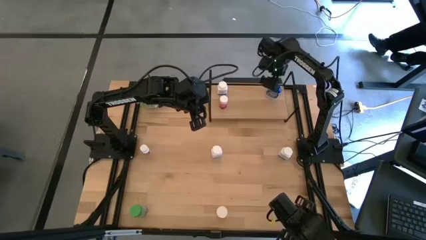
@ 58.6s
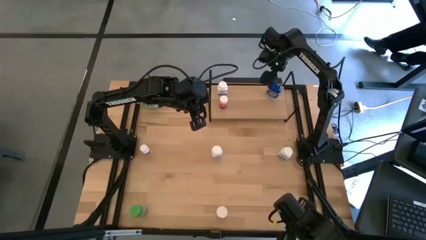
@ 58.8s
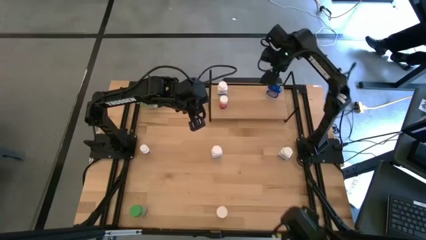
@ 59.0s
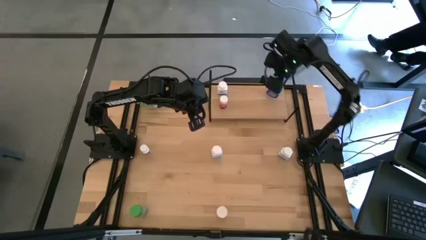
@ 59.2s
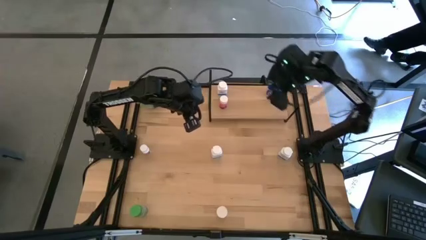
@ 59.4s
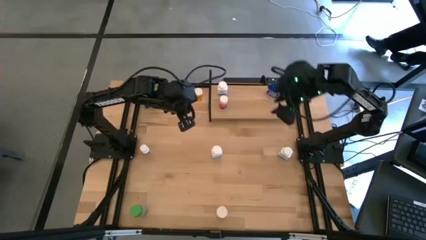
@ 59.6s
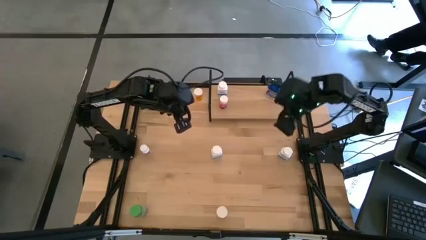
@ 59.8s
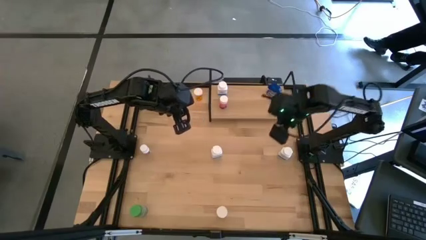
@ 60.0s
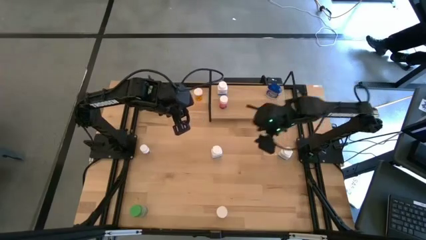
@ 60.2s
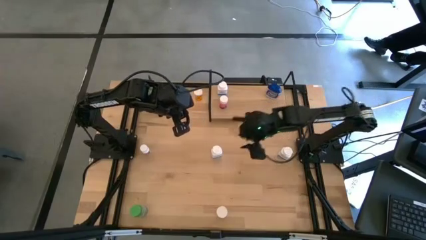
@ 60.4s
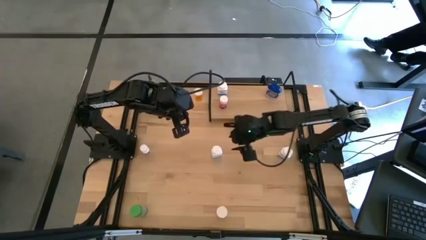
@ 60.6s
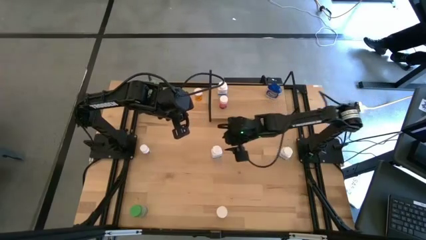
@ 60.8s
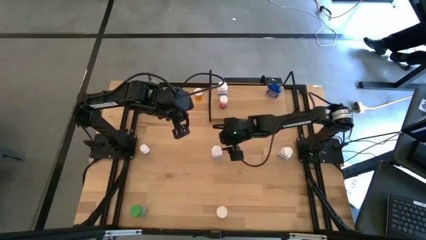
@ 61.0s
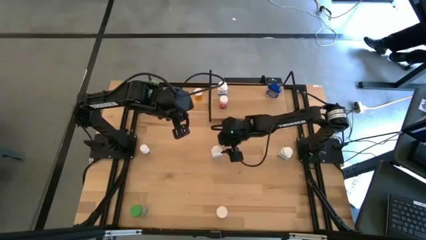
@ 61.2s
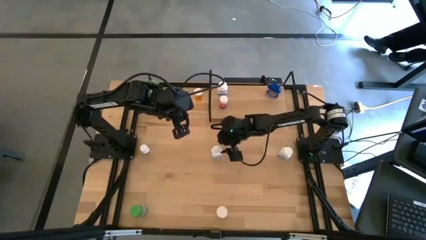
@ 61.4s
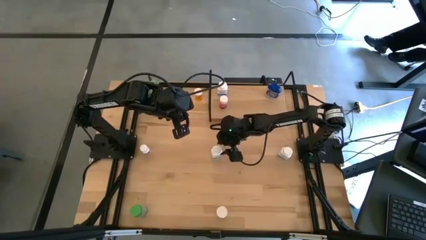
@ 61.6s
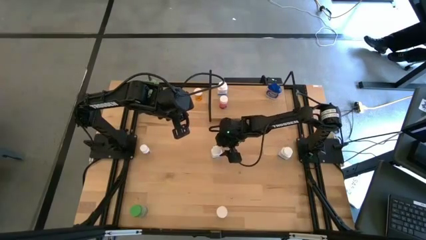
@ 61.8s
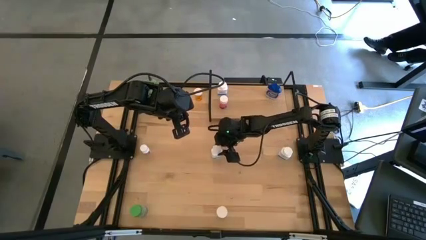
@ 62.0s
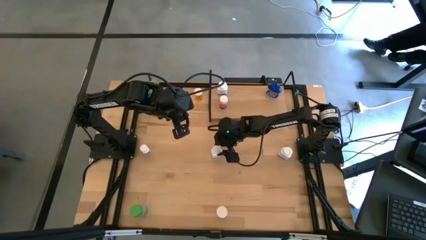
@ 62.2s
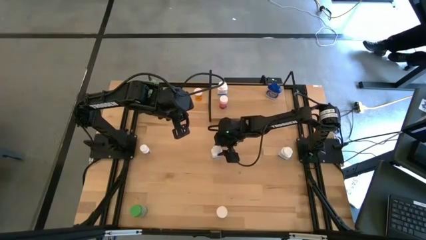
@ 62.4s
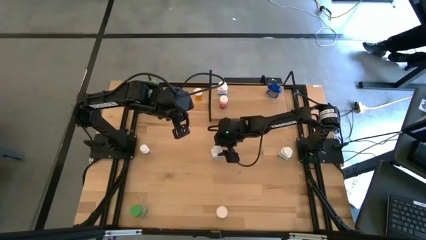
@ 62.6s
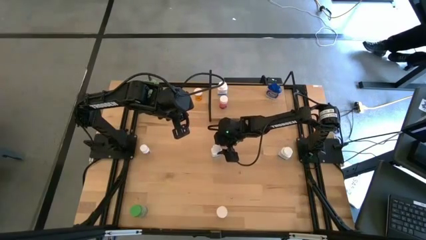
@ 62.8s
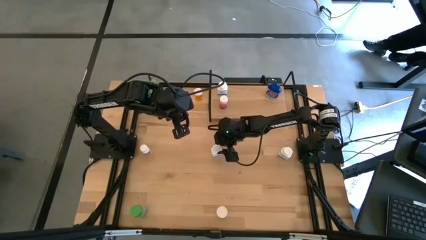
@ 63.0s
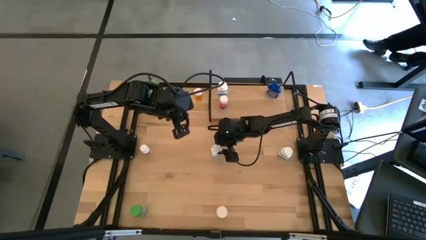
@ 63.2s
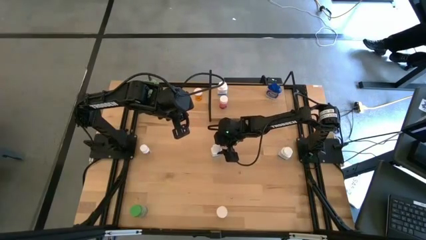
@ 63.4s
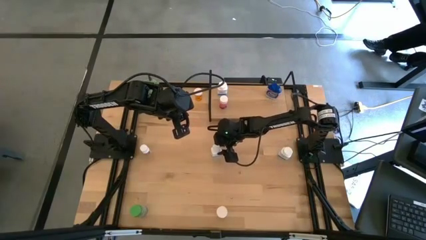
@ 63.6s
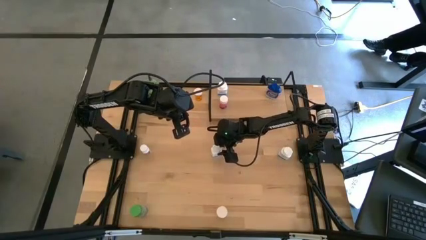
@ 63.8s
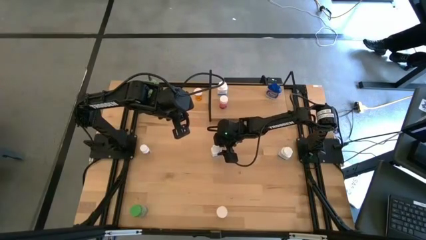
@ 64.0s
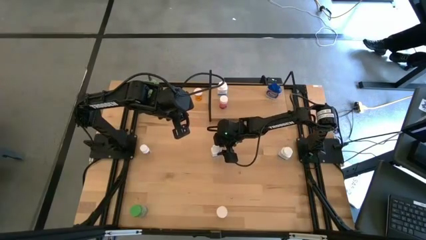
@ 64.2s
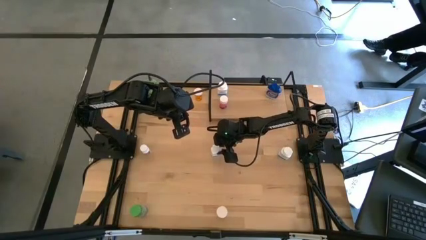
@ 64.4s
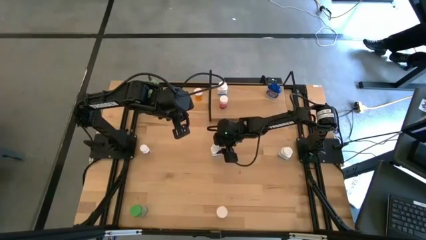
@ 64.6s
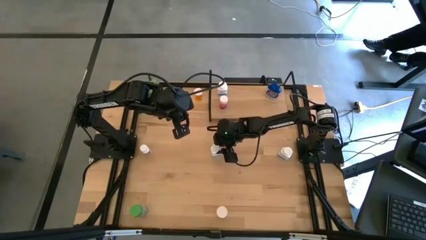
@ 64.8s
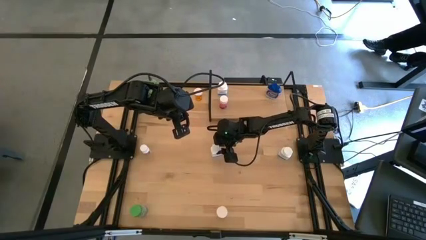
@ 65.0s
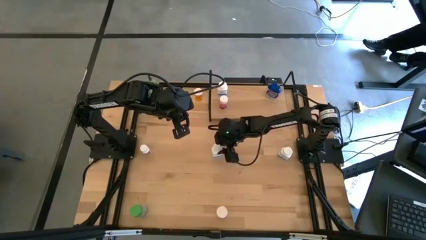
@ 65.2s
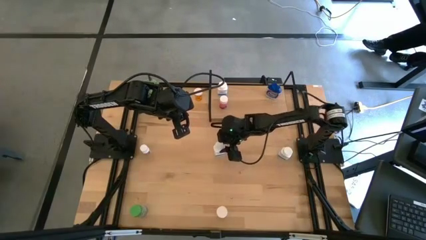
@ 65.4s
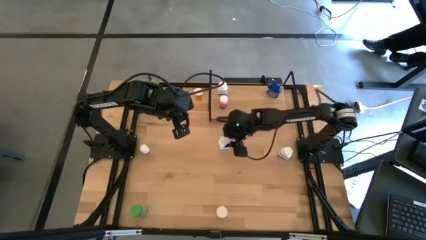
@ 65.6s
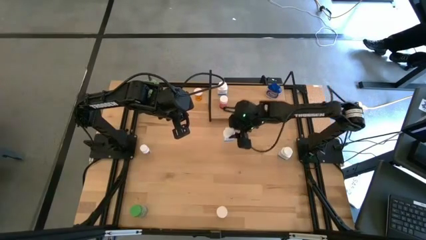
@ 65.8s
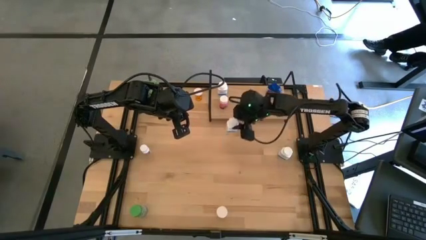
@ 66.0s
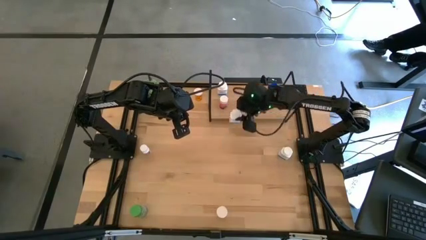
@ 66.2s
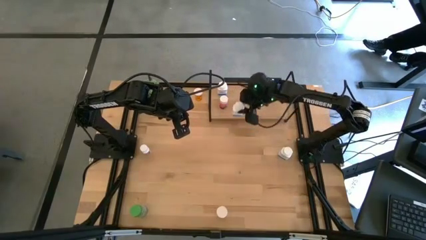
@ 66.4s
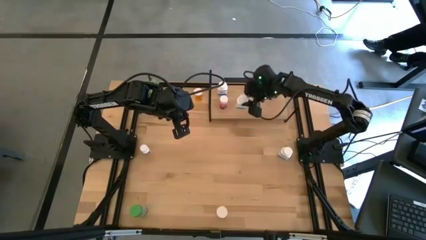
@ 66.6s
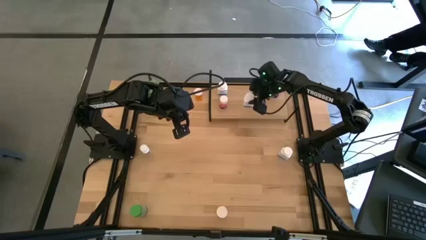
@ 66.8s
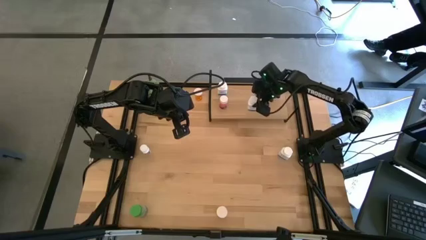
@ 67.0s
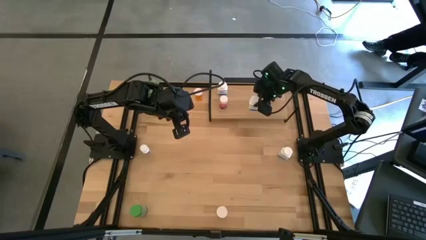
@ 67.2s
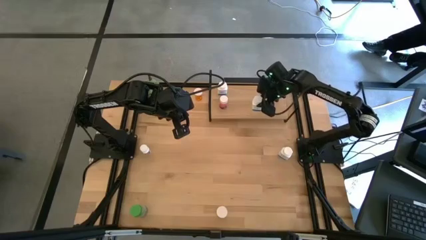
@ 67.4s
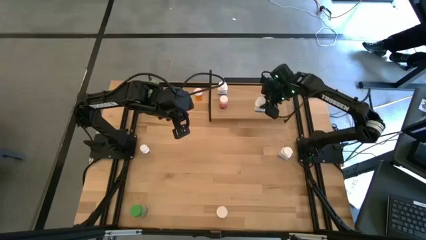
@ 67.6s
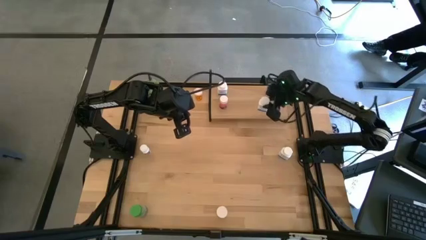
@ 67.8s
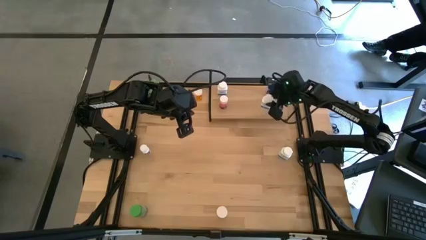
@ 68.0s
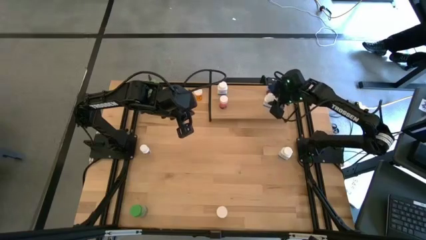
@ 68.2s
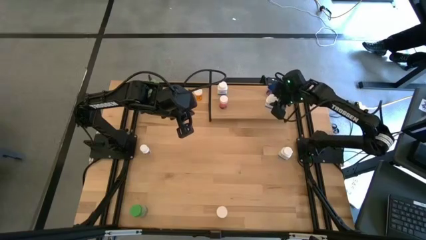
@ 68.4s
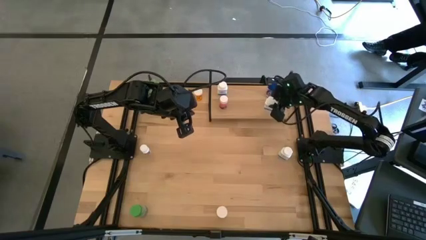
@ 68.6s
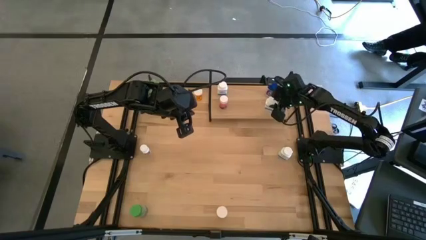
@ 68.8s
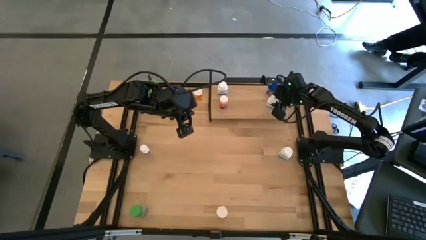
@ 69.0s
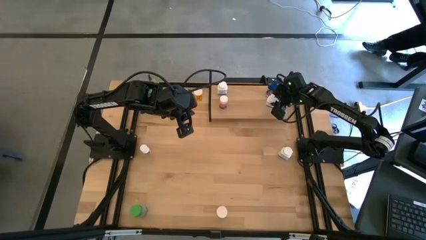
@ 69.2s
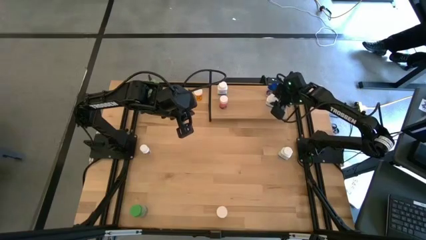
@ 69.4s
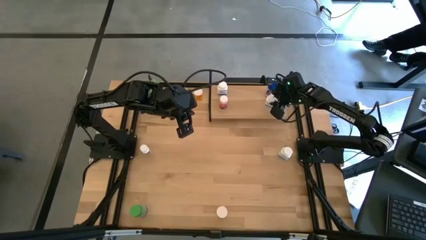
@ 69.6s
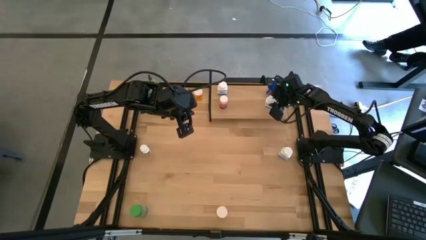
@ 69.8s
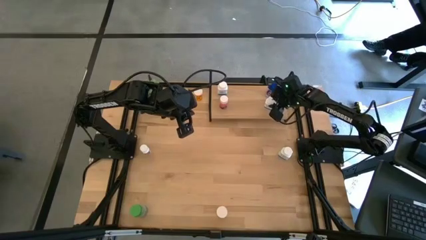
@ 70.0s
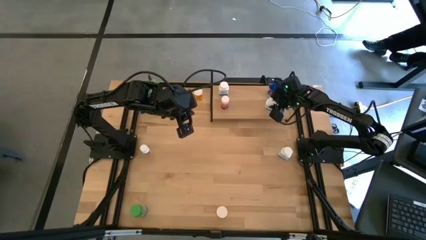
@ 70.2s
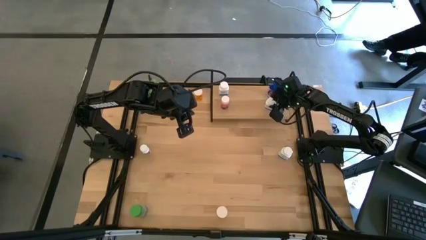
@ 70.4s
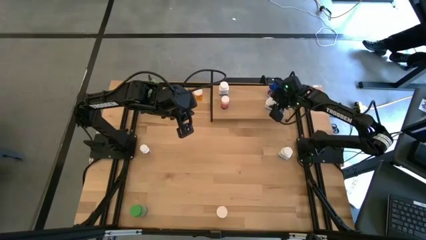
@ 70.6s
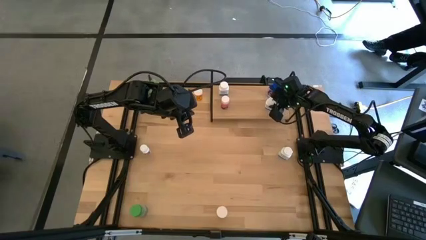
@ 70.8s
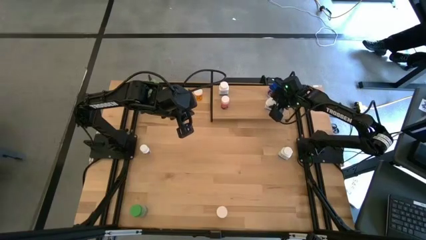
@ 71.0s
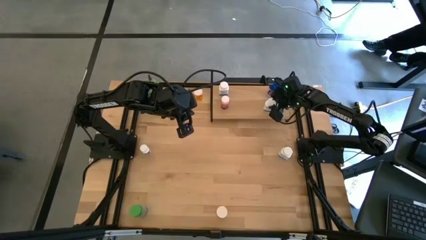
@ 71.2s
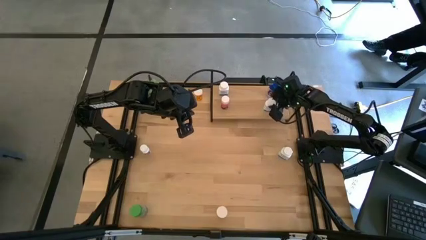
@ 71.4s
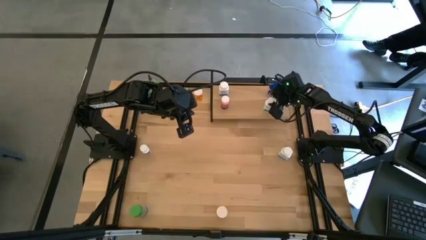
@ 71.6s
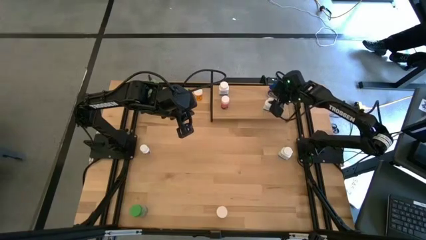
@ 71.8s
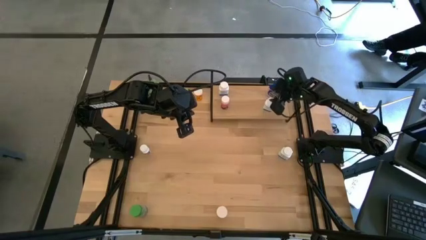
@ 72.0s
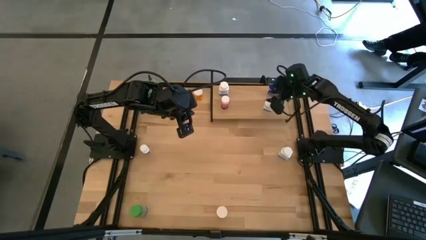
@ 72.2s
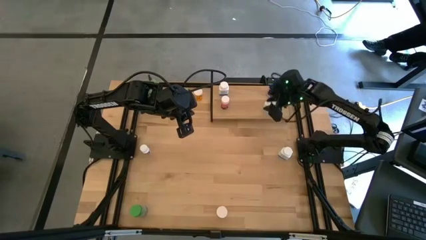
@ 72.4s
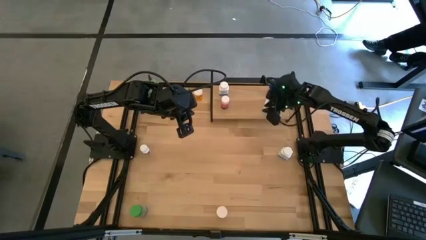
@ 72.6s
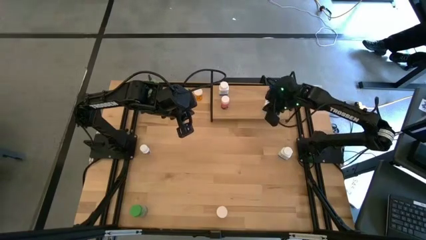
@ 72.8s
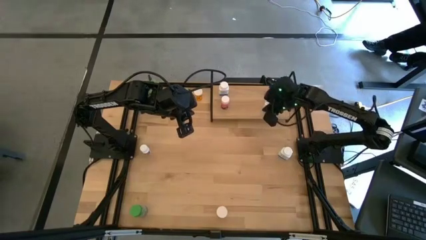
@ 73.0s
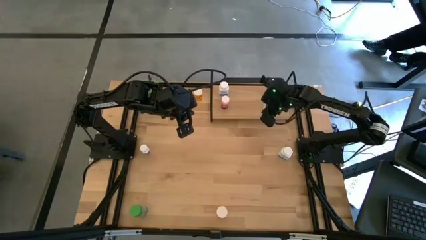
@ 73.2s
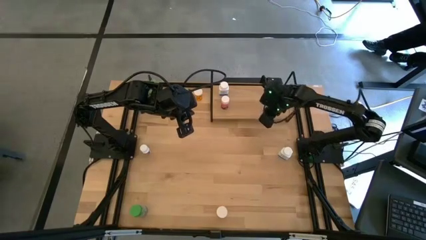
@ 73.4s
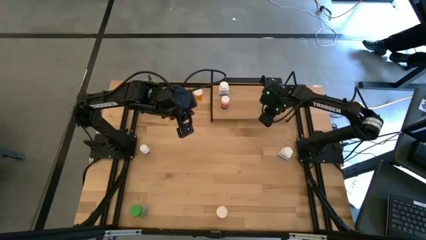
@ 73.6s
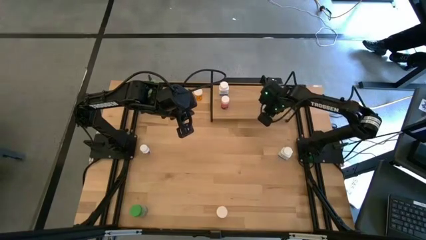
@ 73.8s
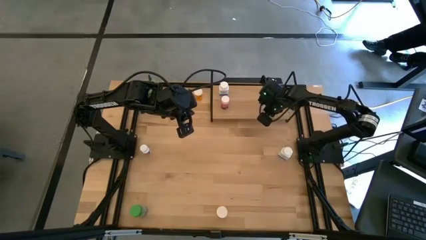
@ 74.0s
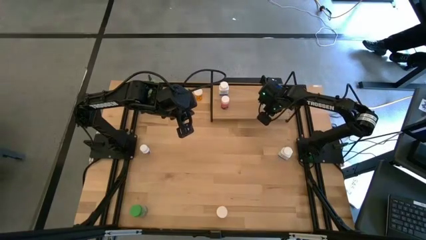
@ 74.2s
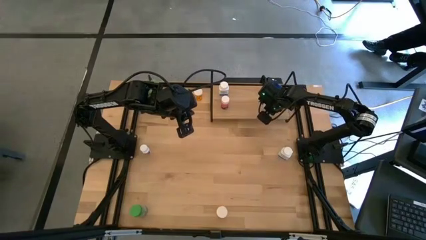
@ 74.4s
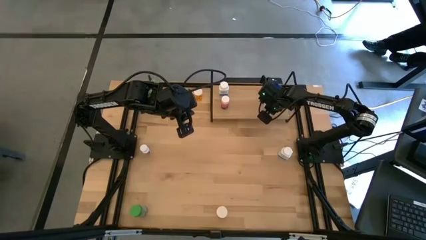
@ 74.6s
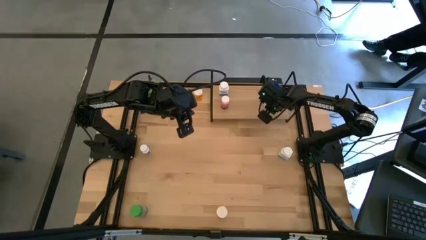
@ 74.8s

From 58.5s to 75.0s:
Task: Pick and place medicine bottles onto shelf by color
Put the white medicine bottle on the shelf
